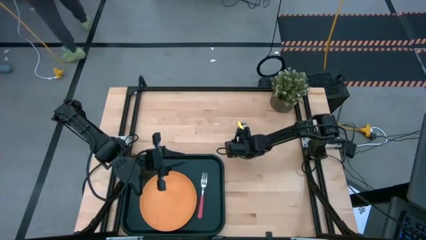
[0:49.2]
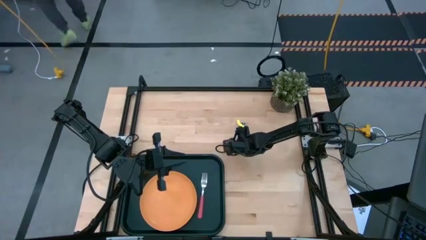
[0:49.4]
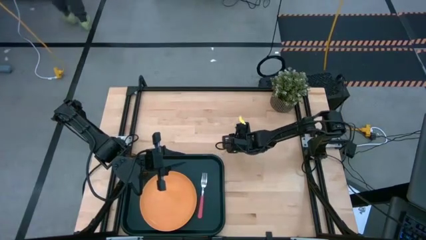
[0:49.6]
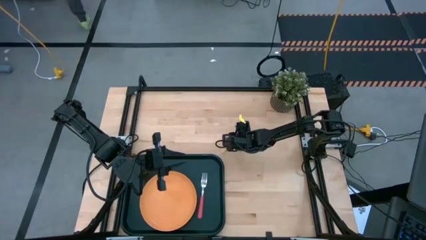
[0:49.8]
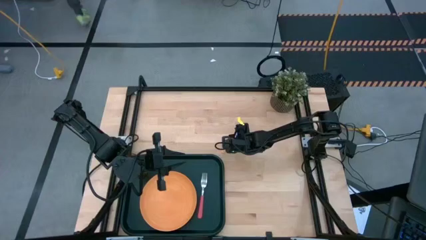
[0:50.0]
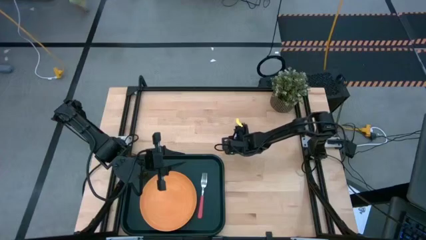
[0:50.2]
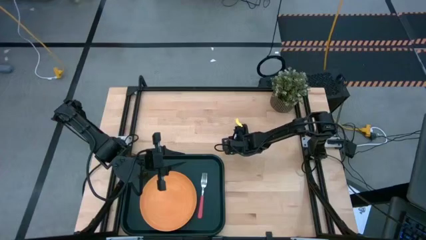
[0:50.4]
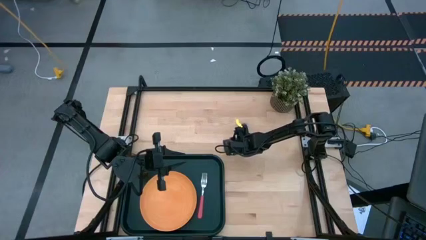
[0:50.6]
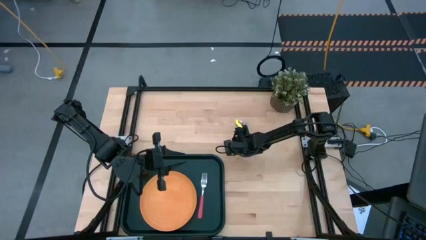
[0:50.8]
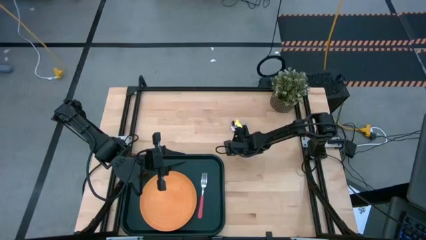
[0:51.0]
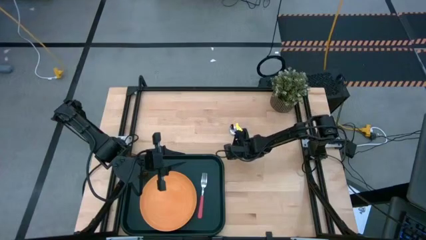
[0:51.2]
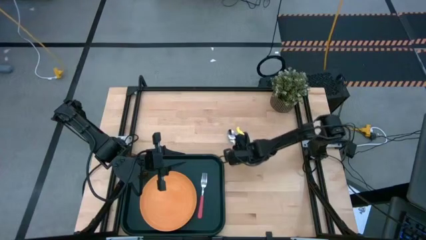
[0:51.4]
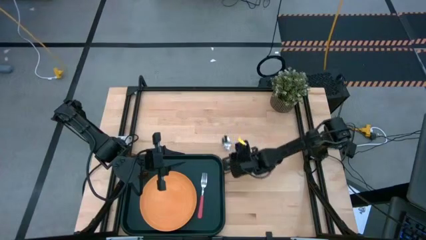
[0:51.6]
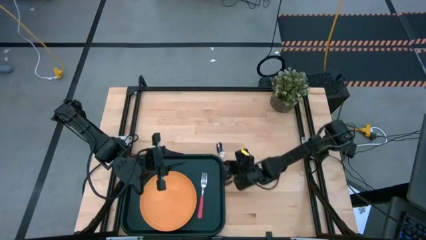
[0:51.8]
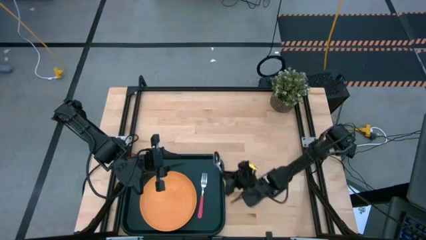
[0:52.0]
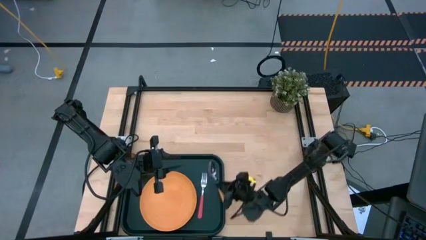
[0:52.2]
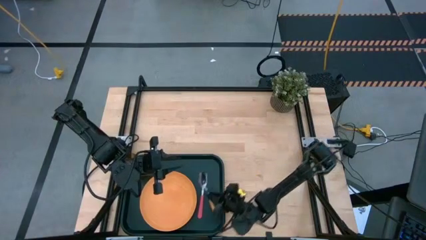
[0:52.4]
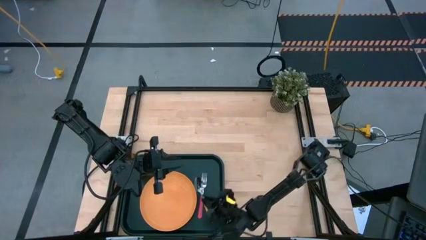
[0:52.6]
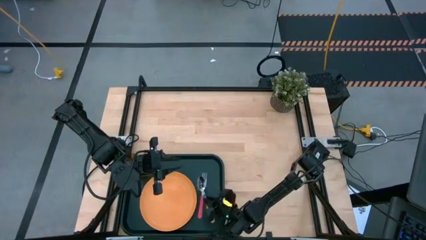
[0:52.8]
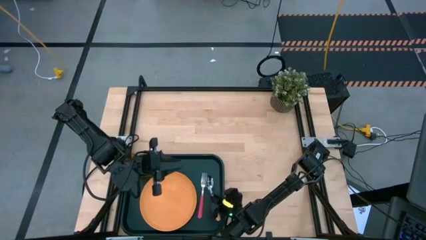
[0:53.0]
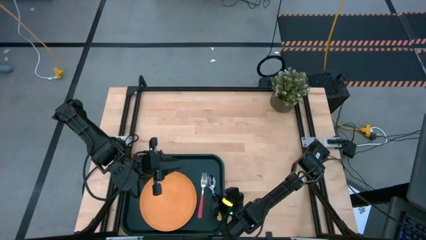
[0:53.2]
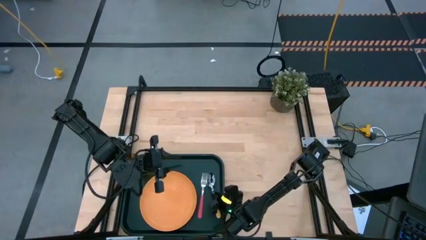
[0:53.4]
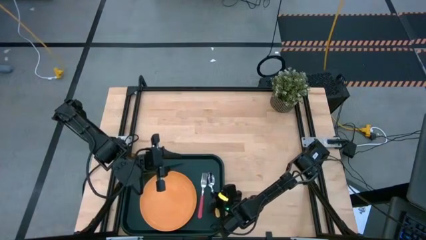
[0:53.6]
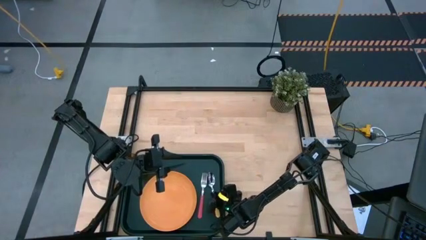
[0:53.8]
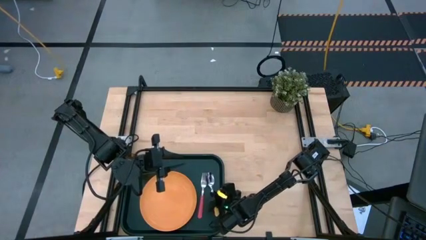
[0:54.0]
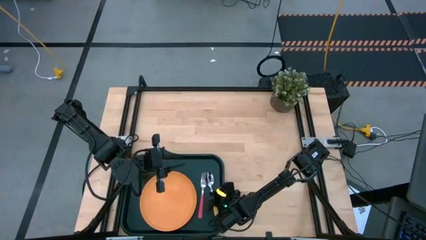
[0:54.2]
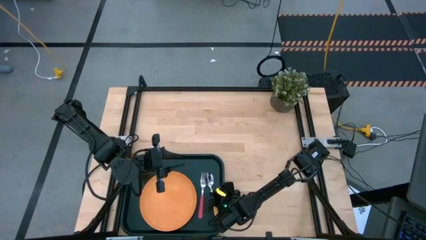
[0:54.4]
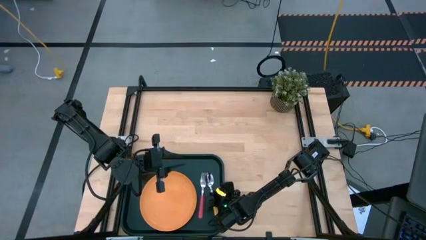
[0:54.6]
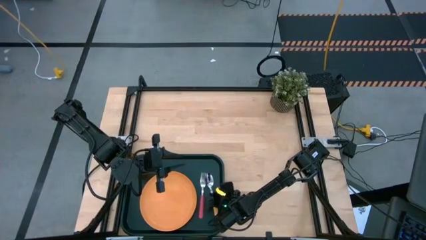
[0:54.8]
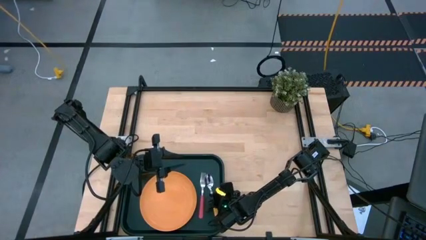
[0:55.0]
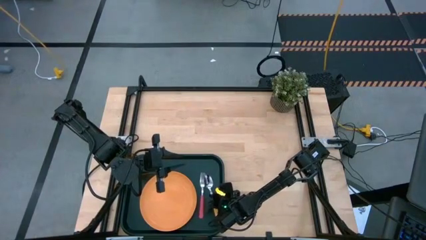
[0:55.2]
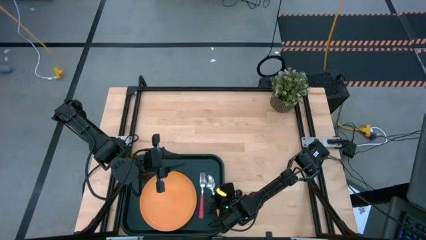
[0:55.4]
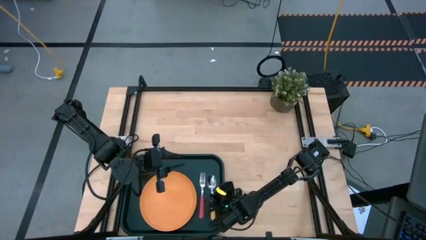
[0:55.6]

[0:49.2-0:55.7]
Task: Pick and place plate/cup/fork/spoon on tray
Put the orange spoon on the black tray to the right of the pink fork

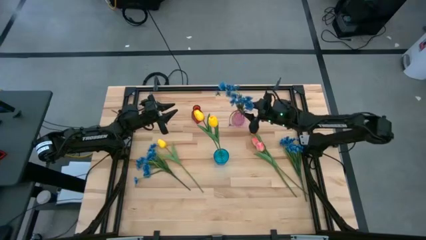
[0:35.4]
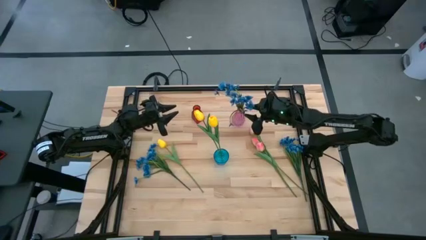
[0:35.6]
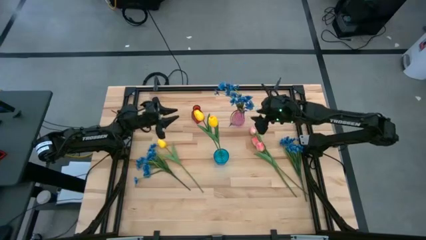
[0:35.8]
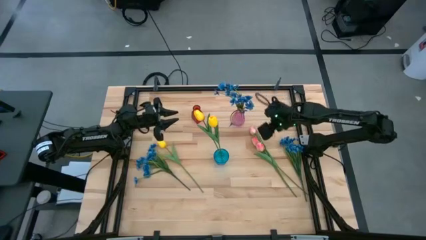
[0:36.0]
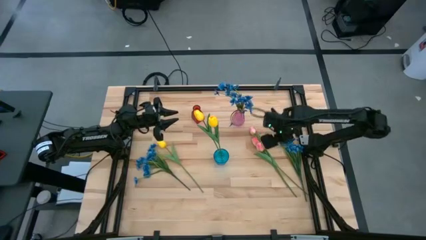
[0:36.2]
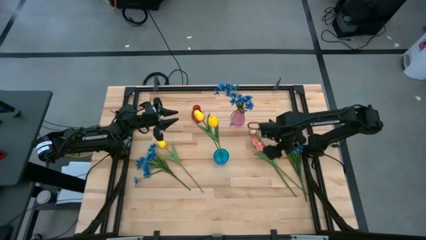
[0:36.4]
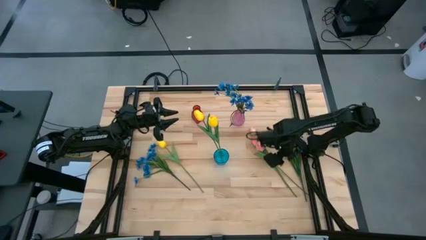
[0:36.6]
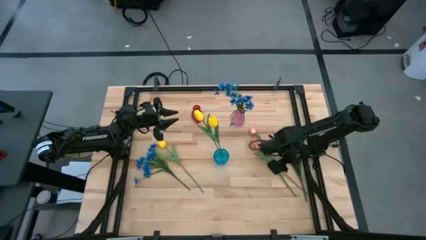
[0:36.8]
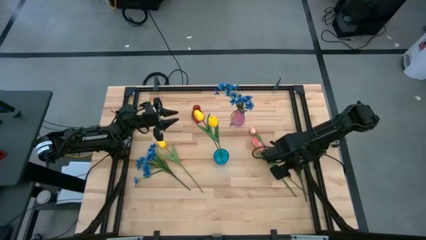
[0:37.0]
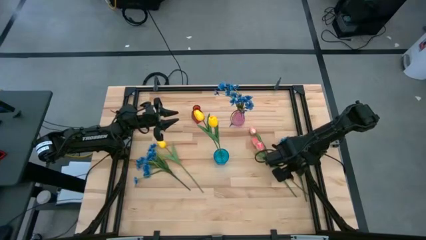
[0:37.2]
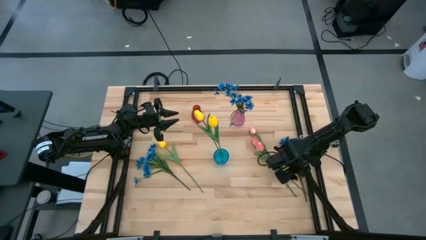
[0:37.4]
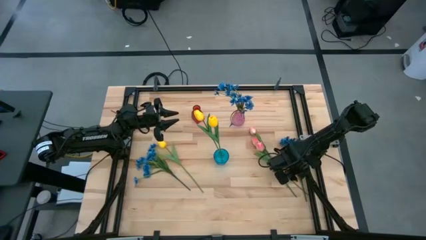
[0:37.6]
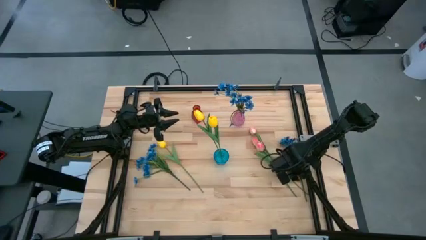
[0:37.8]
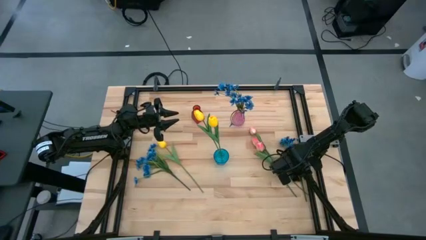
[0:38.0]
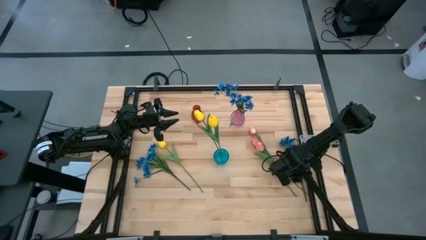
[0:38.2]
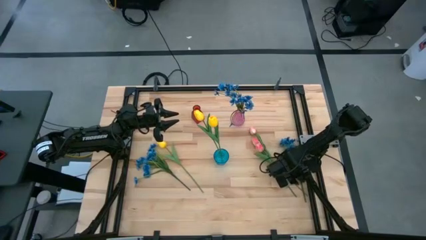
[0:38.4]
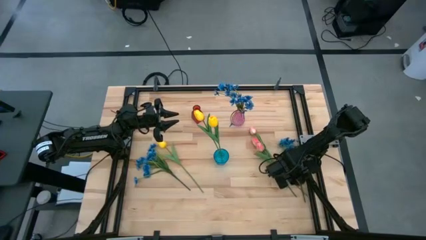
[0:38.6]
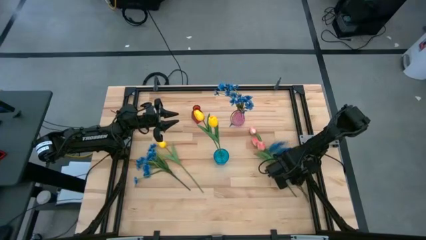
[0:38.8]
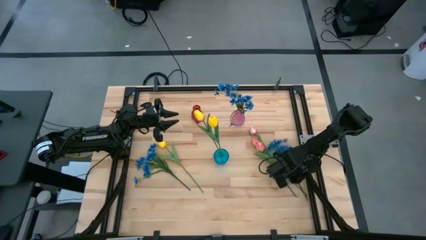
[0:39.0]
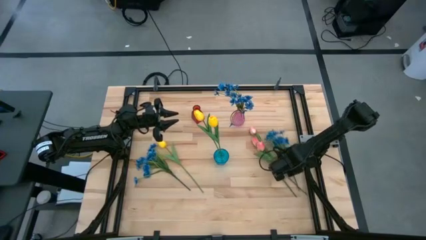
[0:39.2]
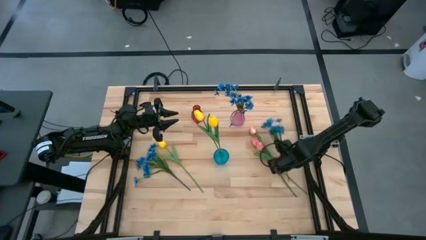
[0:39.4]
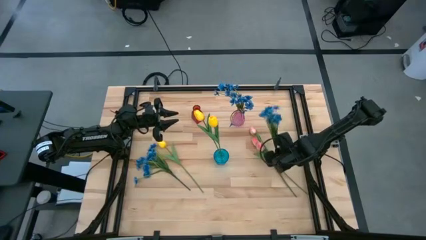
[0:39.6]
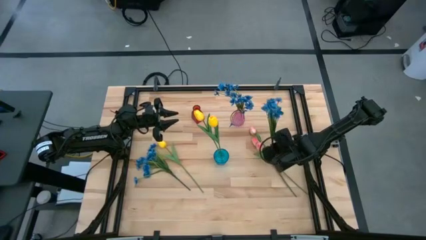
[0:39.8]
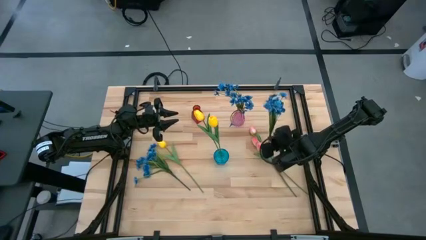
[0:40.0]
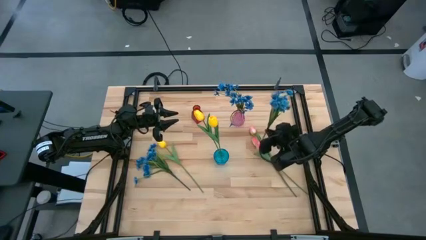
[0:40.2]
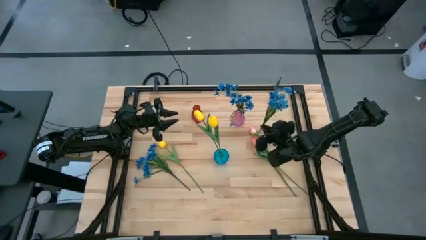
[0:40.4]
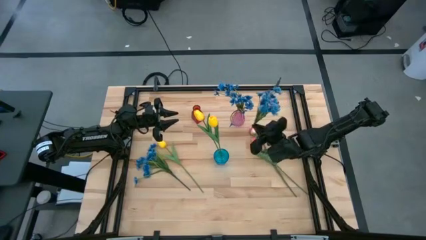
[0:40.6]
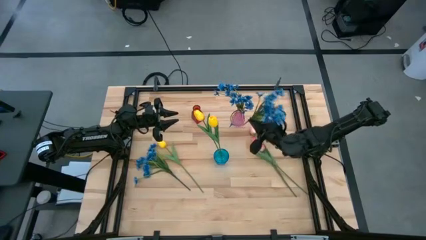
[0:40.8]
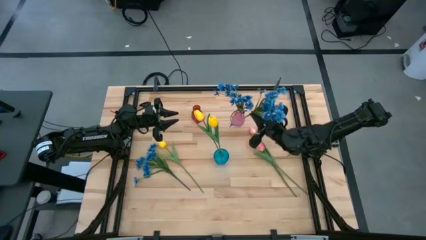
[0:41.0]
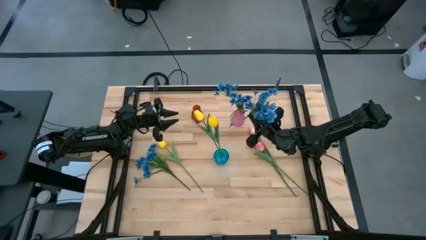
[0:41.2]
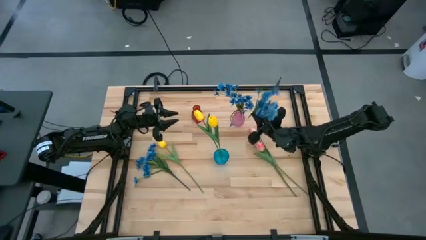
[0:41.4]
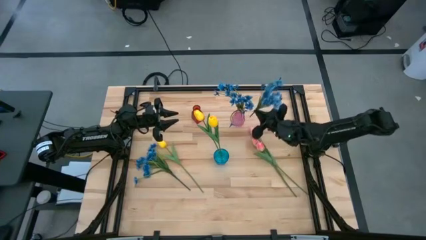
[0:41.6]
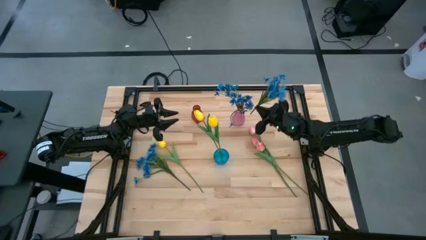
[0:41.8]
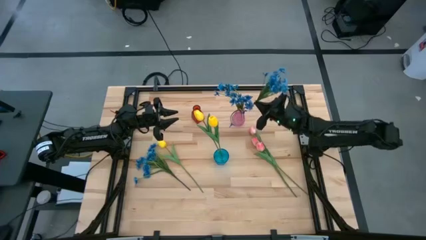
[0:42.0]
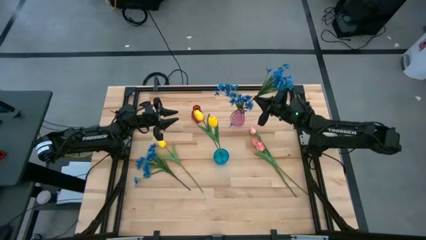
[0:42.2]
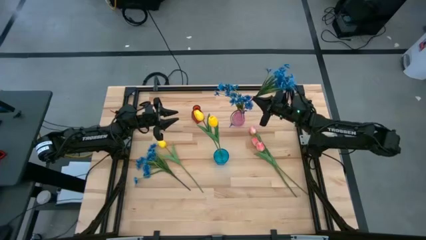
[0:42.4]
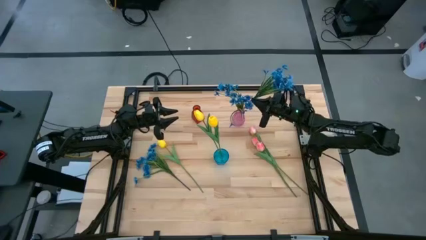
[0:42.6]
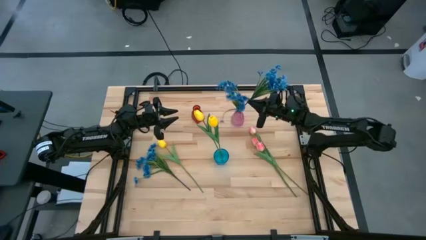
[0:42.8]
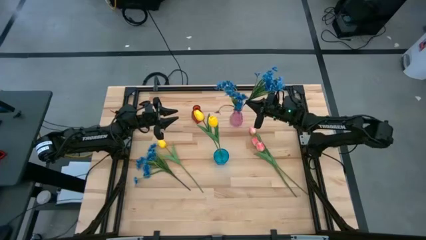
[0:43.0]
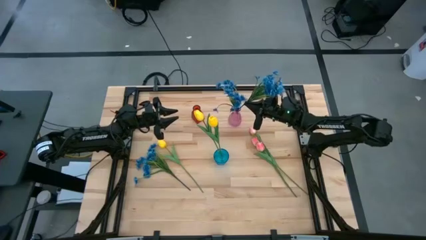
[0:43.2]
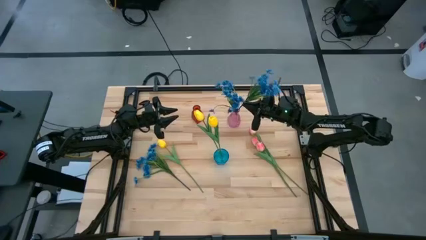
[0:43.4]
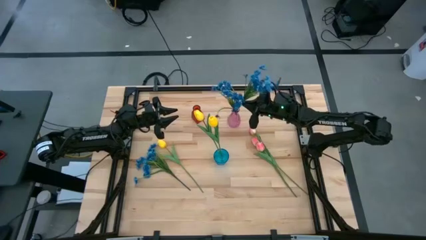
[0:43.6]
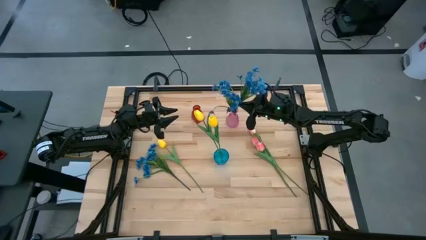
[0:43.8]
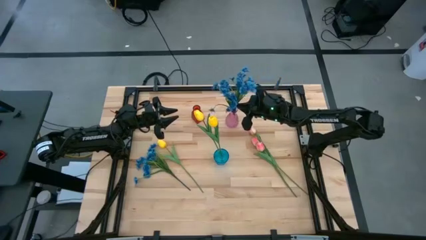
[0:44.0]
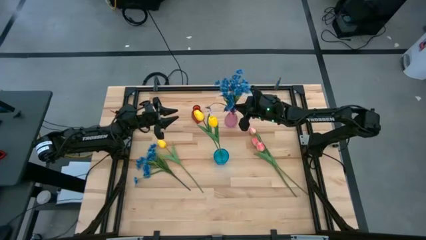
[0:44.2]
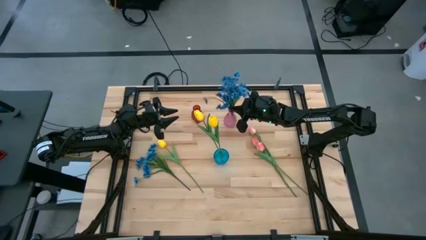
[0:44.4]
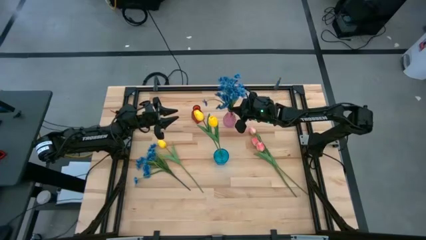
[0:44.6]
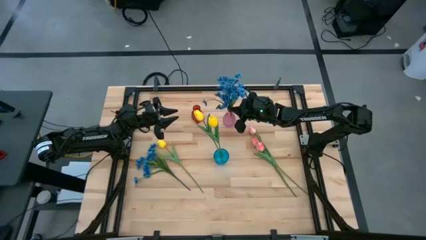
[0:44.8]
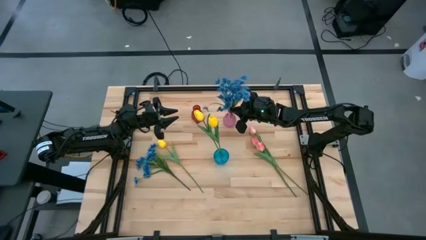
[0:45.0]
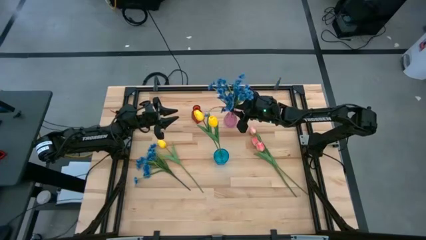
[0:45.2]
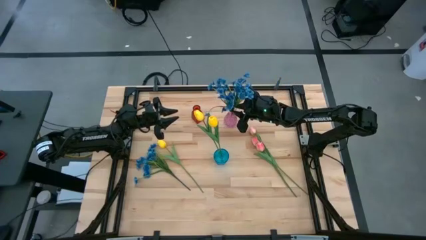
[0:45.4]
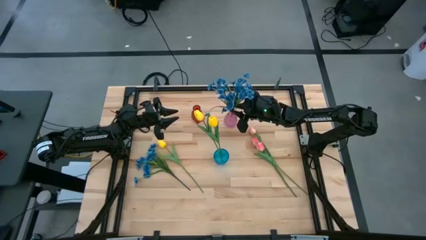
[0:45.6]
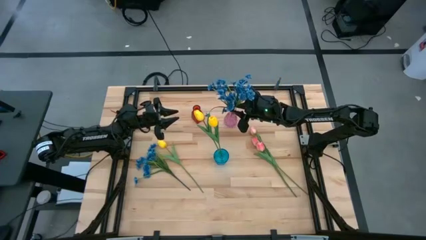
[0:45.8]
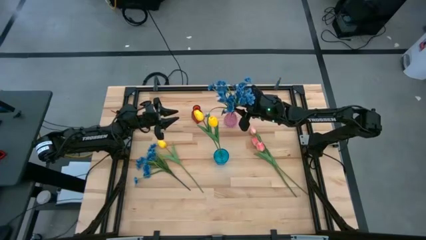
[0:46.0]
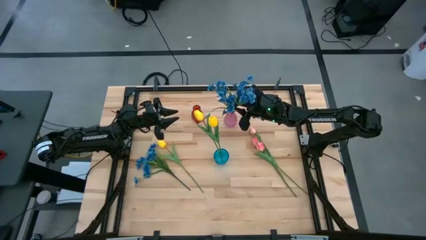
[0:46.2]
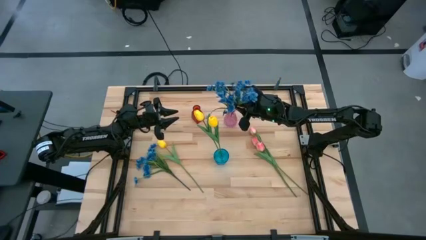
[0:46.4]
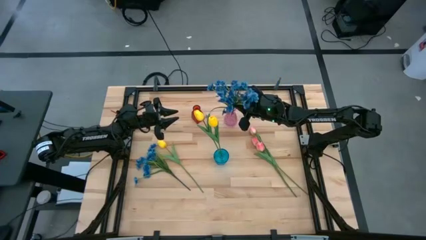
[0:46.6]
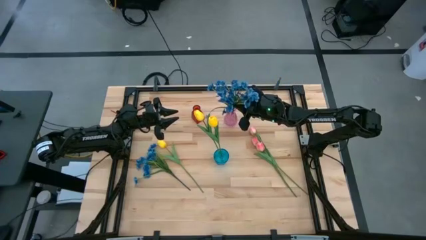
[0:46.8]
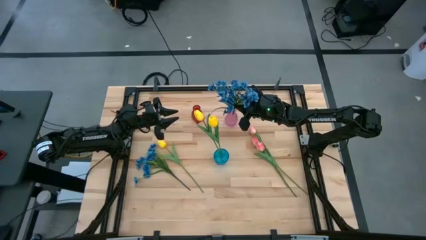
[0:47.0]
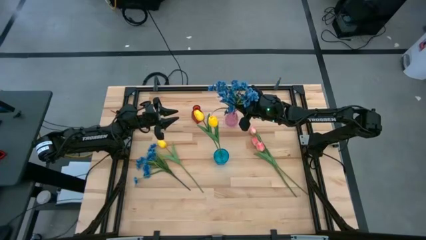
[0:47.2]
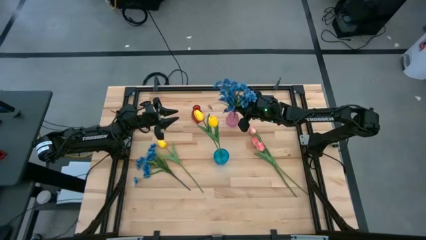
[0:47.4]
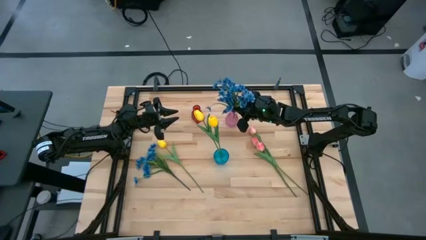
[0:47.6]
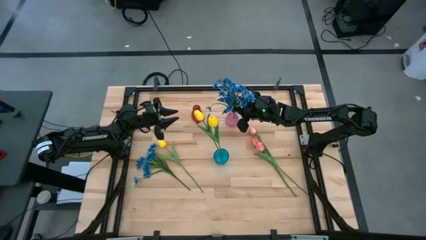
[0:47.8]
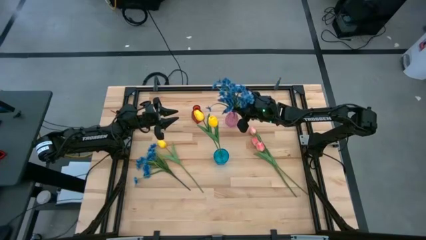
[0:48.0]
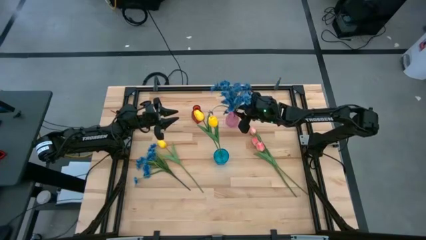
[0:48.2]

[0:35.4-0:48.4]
Task: Sort flowers into vase by color
Put the right blue flowers into the pink vase
